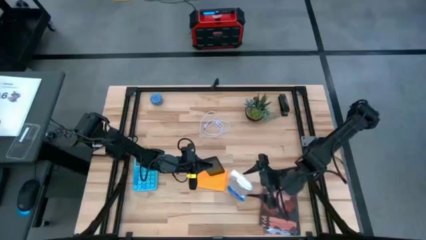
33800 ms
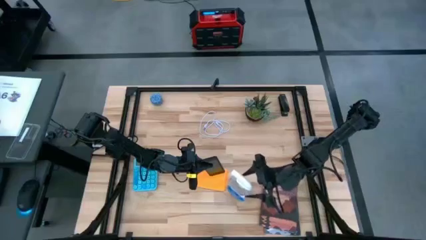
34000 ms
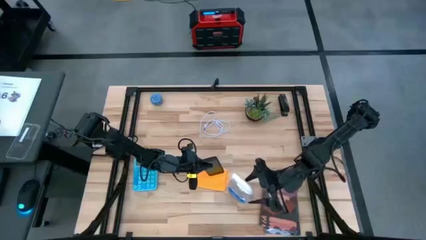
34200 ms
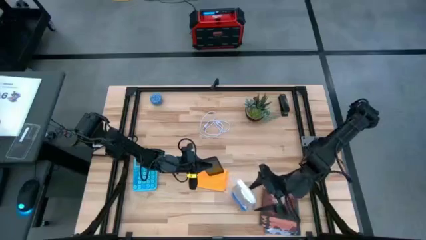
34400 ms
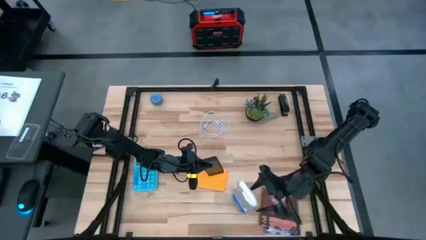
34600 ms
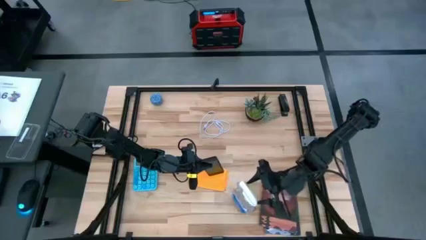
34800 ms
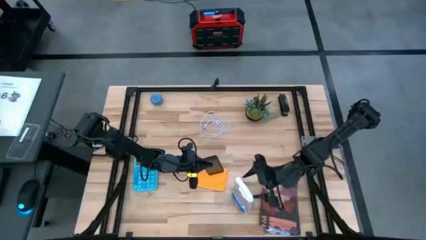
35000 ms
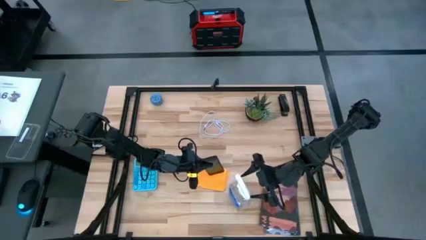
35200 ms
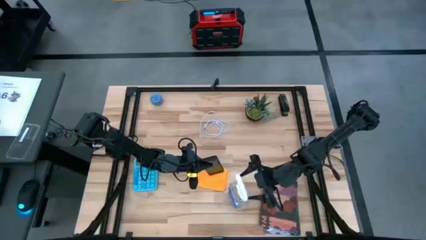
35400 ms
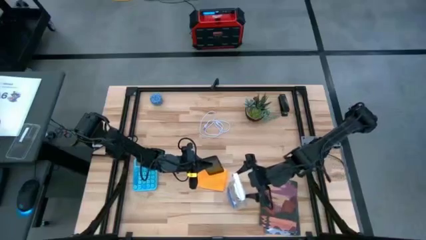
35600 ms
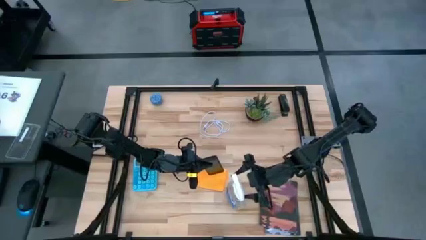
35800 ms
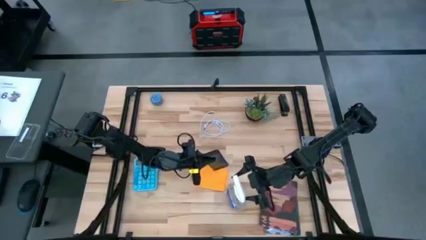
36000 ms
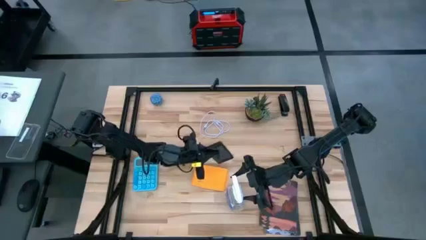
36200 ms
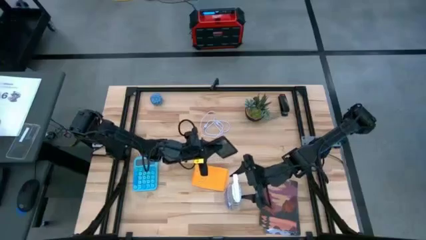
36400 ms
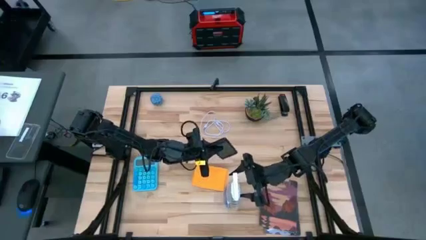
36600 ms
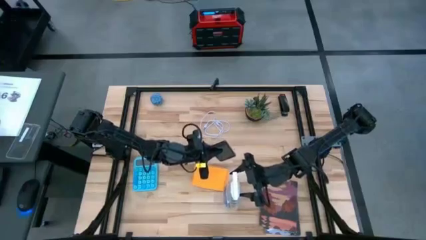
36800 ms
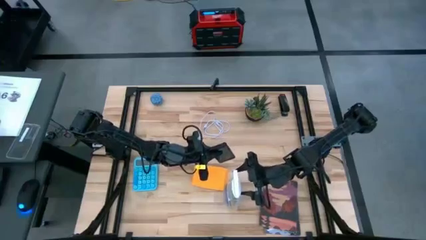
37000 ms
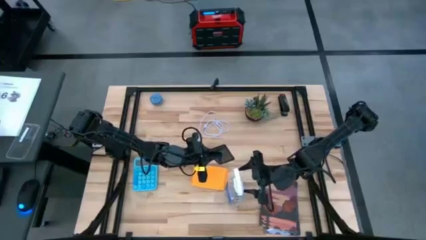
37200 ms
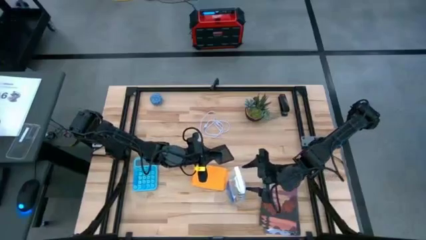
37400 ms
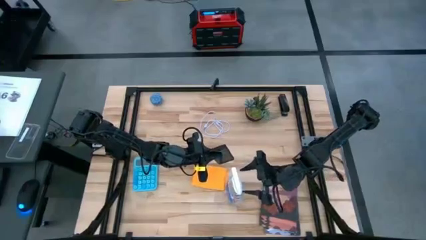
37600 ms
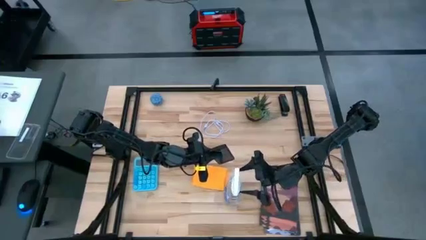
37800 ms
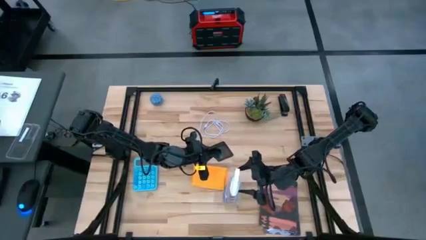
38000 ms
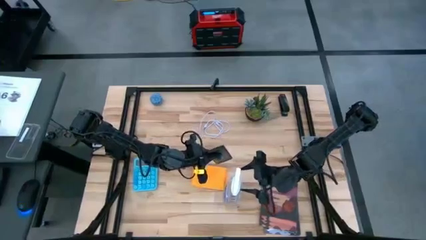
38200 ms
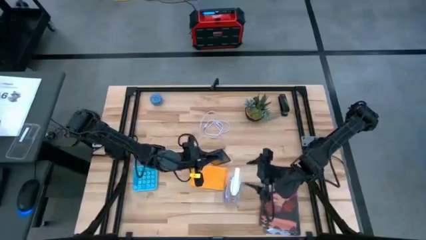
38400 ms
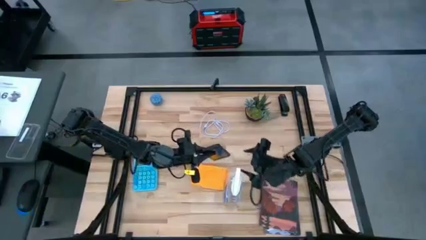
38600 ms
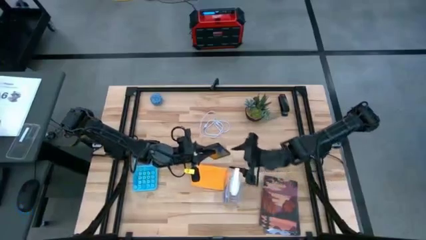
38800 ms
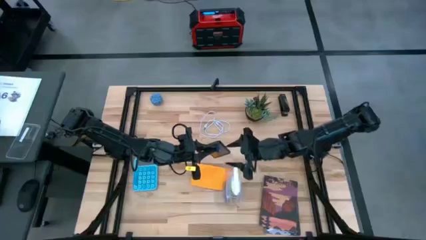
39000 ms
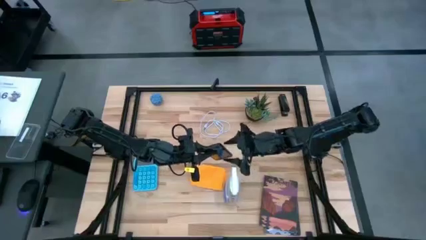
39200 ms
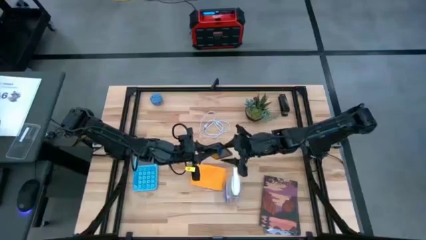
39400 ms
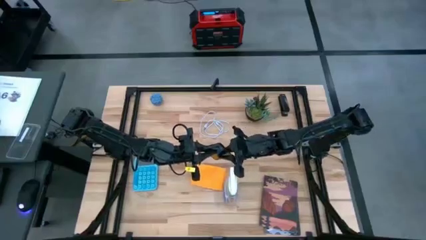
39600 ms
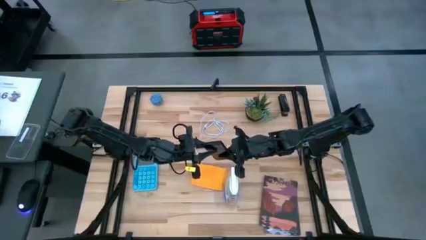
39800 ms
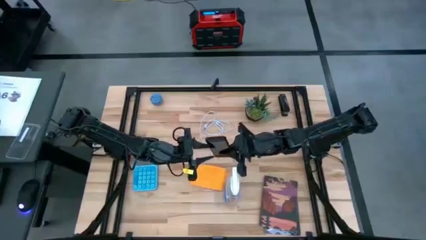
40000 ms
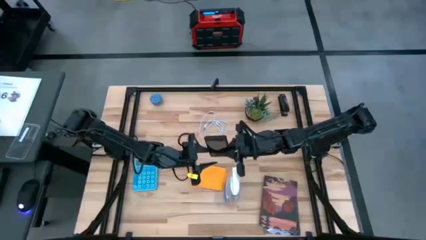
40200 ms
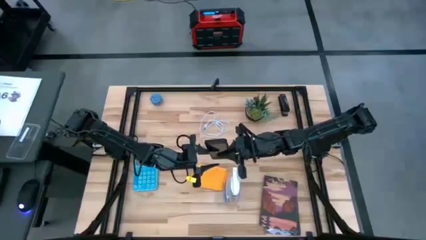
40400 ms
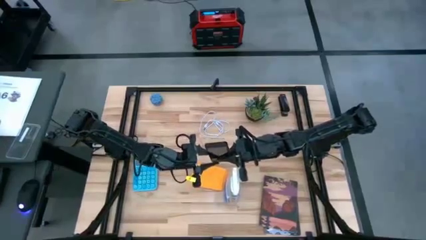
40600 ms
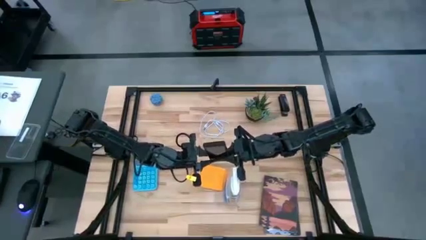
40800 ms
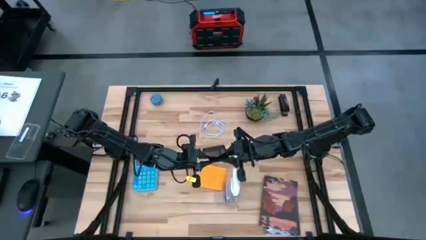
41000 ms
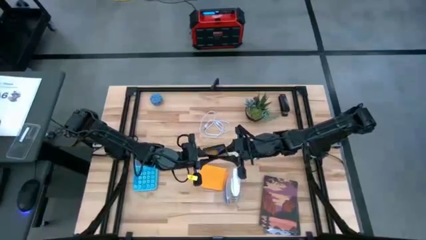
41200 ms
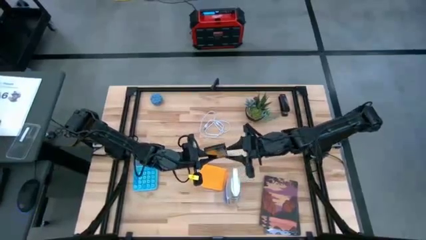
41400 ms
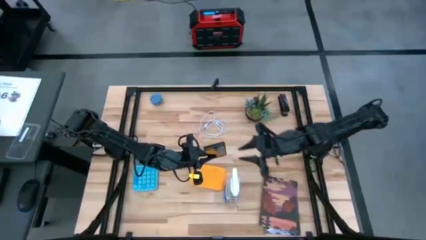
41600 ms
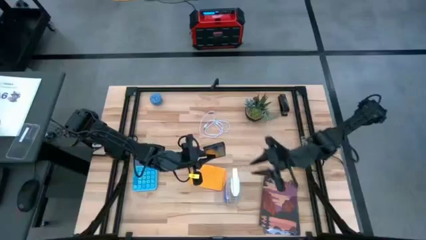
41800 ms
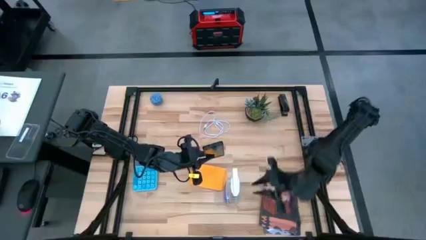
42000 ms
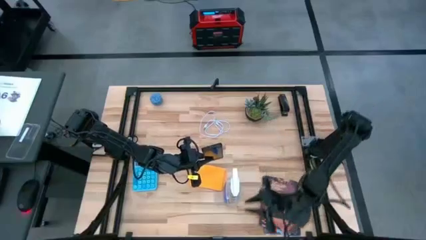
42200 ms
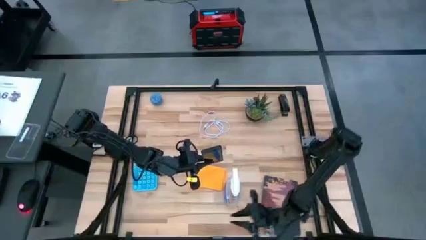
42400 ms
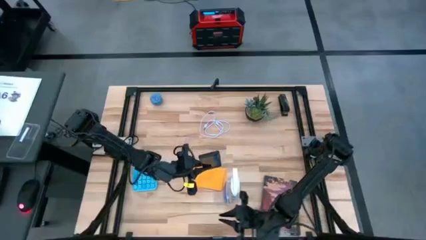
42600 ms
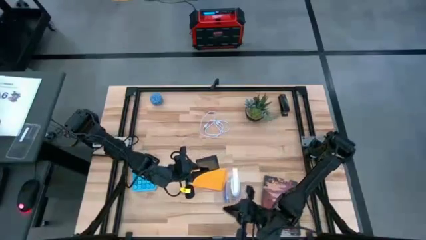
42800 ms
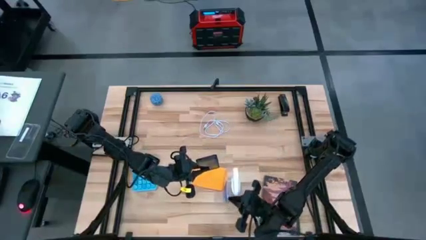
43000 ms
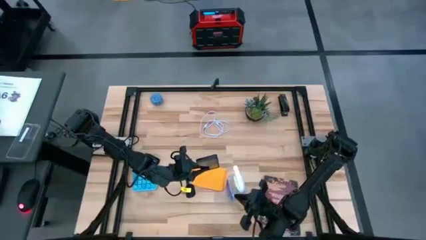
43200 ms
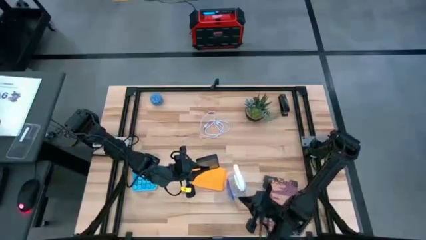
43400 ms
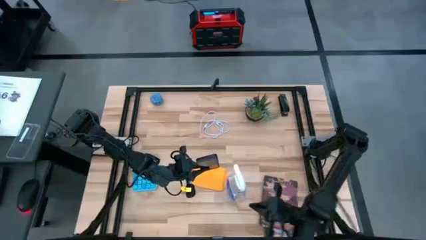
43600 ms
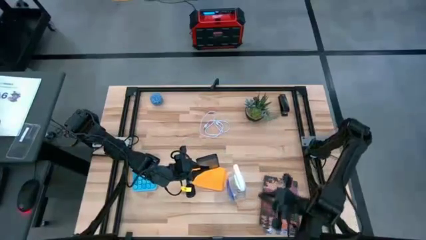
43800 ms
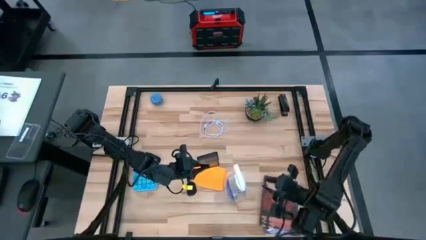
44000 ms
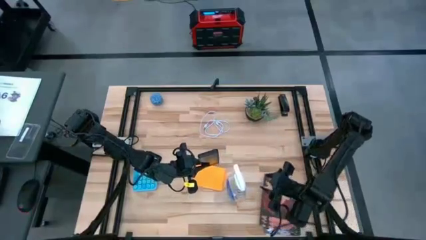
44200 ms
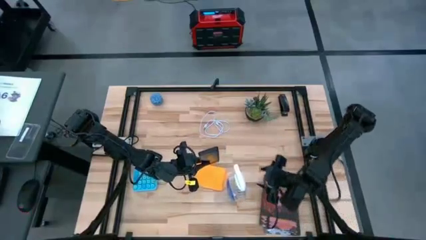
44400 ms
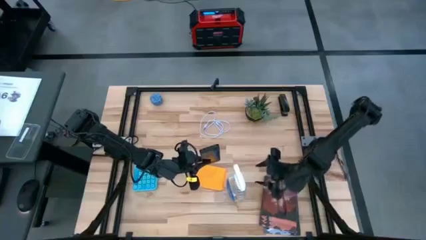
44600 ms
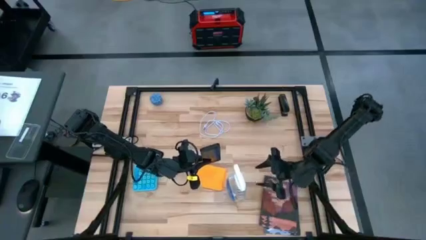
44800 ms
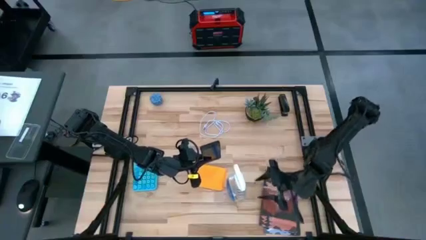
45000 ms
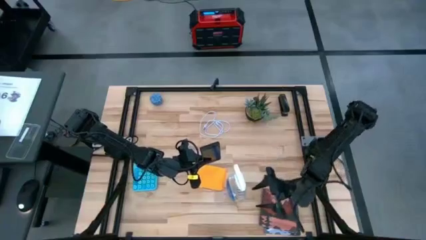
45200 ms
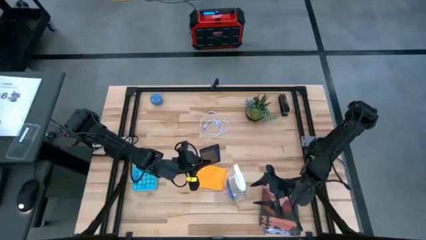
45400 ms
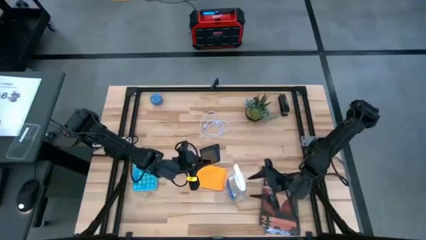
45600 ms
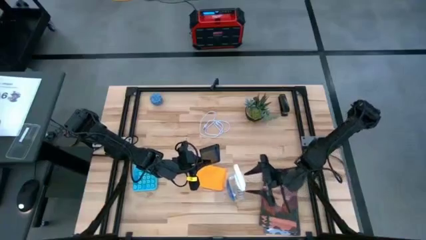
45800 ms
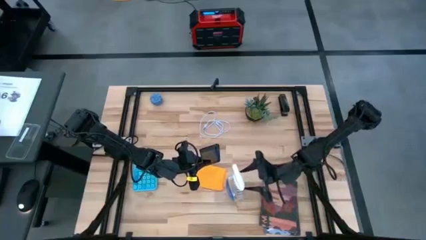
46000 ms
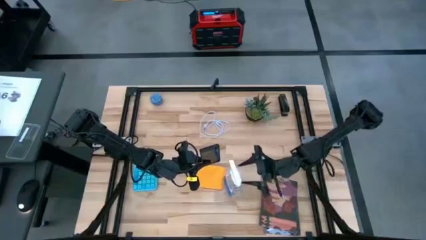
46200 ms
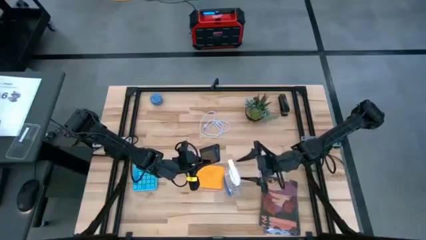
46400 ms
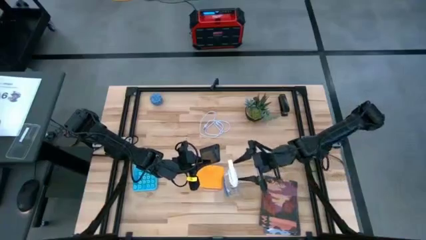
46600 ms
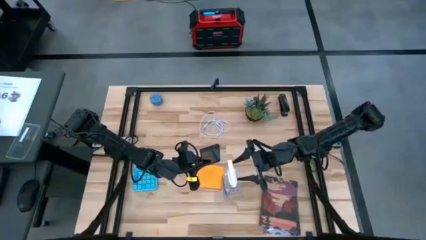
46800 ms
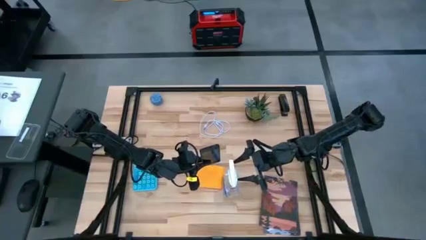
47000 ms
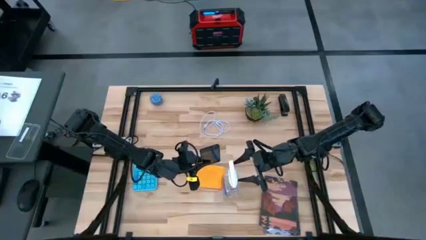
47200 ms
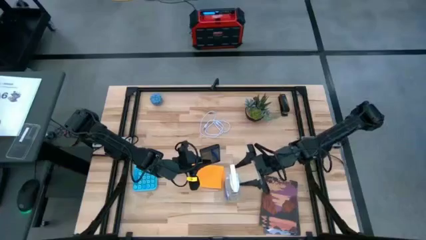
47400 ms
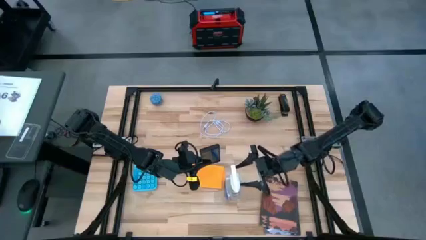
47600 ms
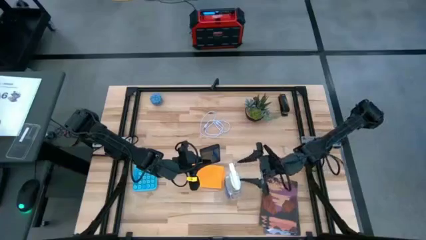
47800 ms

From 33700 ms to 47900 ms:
Task: Apply microfiber cloth
Spray the black cellphone

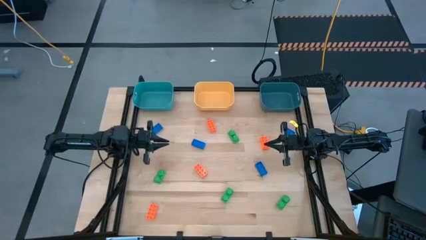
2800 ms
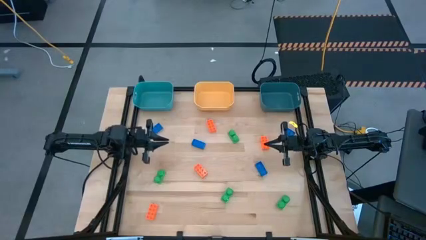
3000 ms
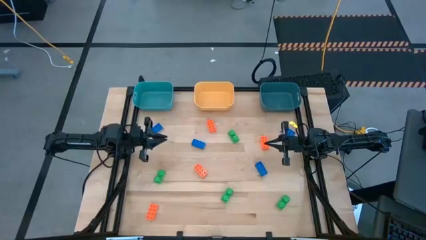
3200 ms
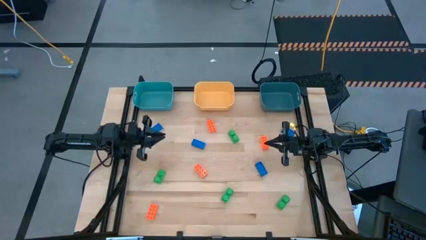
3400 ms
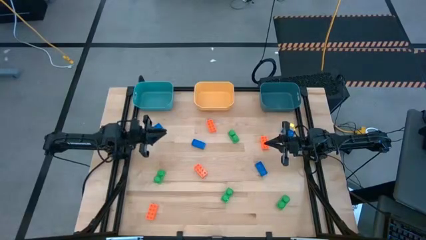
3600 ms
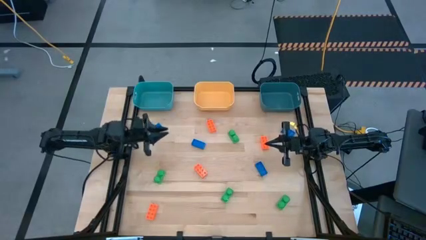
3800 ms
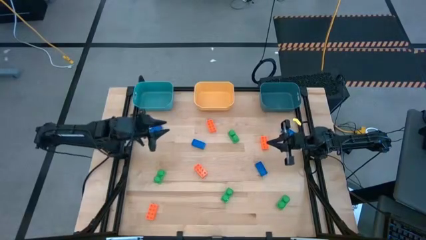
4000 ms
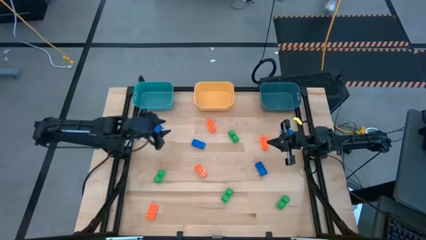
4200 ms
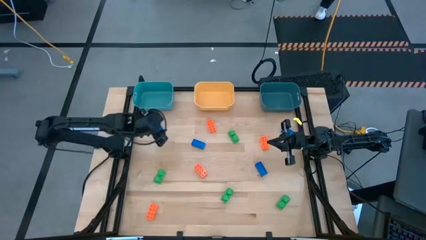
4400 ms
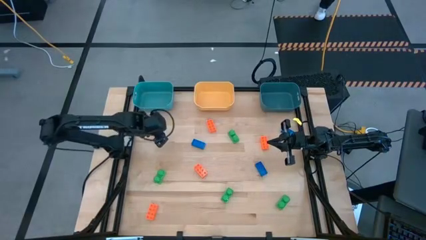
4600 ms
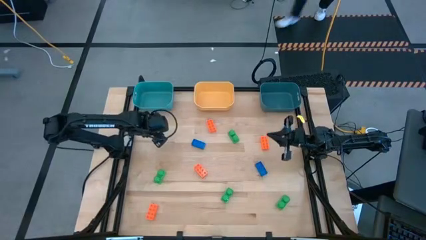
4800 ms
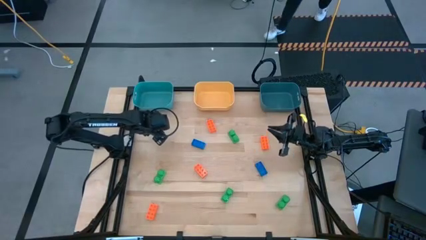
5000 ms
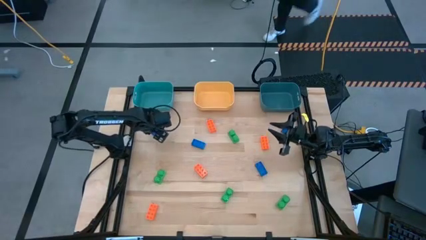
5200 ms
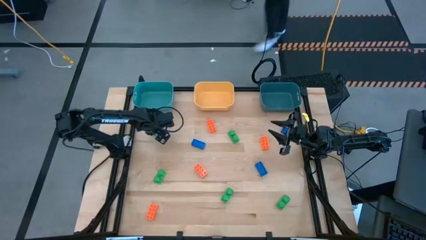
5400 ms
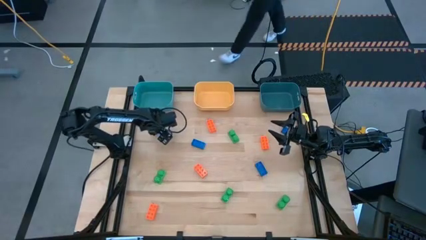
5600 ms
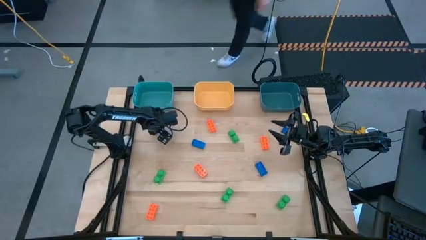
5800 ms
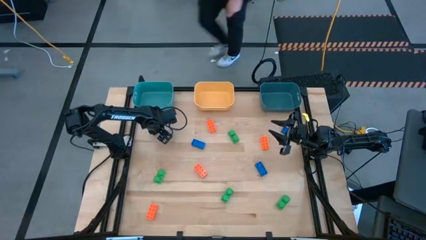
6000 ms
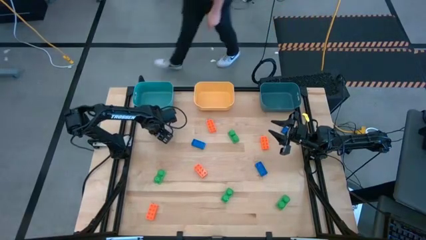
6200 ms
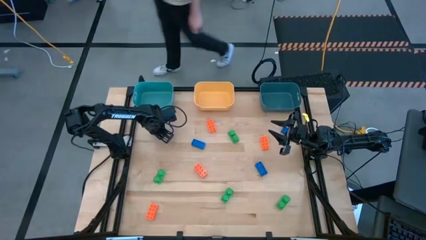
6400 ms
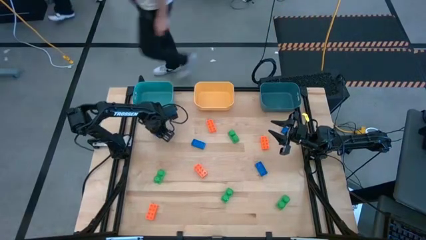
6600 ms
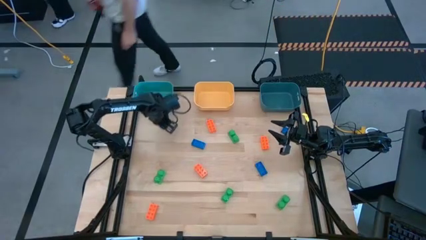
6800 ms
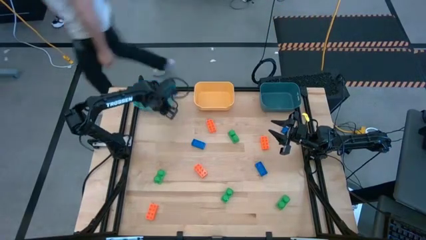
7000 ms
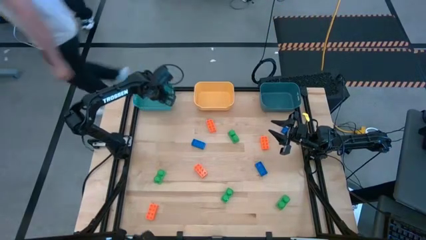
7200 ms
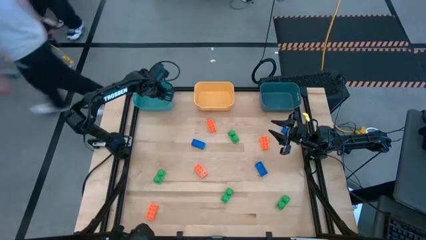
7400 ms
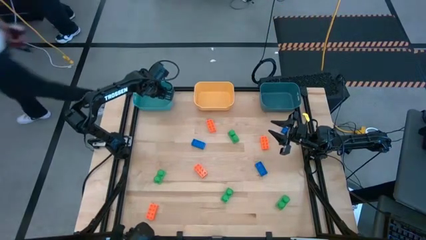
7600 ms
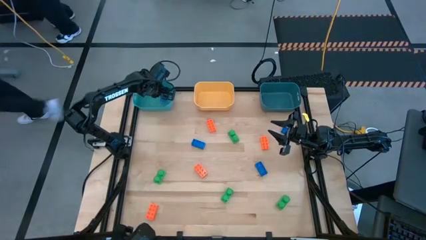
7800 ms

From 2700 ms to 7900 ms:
Task: Sort & place blocks by color
Put the blue game piece into the blue bin
